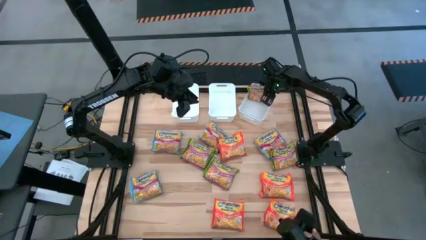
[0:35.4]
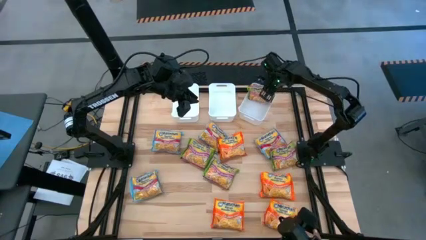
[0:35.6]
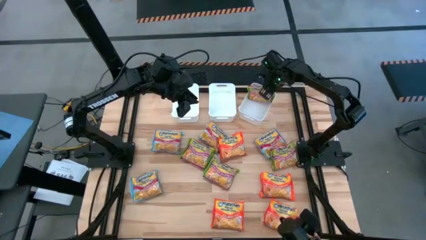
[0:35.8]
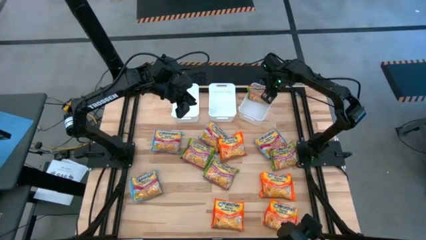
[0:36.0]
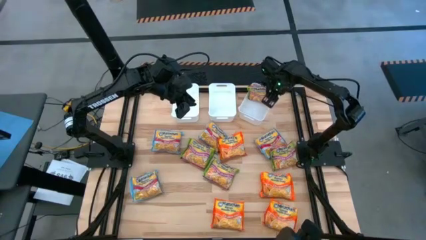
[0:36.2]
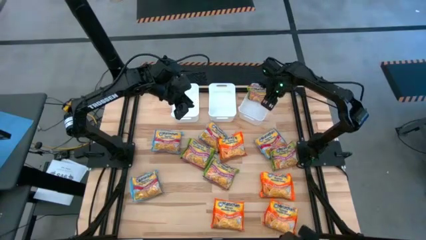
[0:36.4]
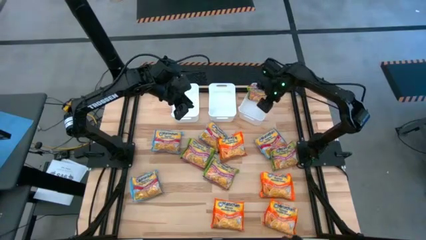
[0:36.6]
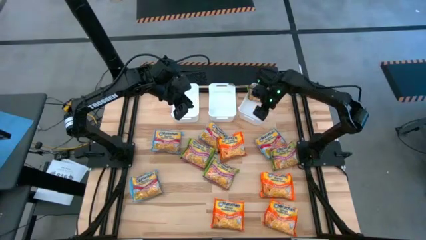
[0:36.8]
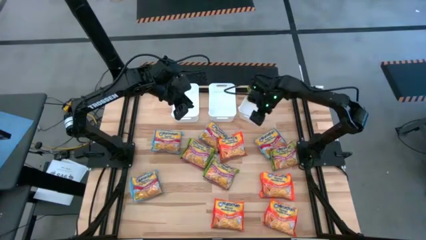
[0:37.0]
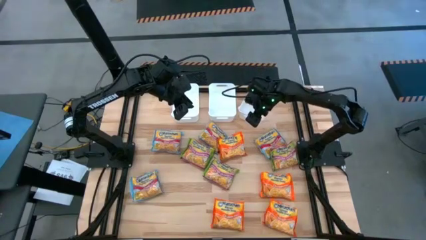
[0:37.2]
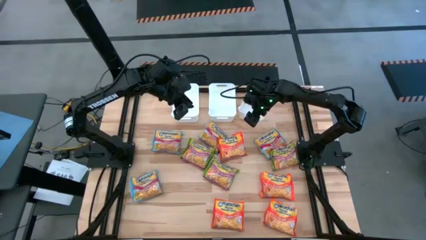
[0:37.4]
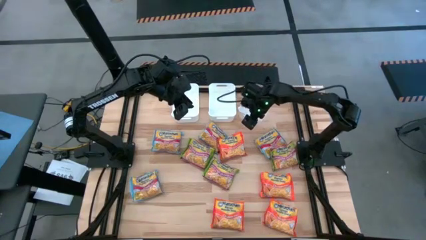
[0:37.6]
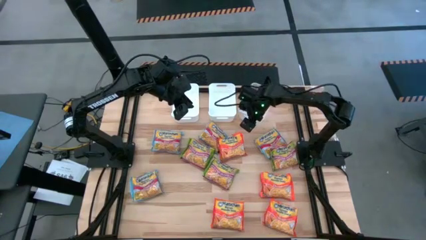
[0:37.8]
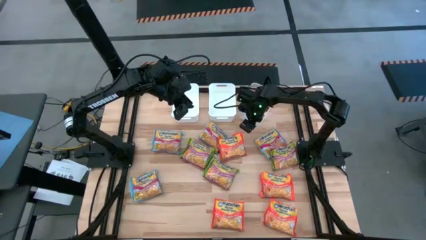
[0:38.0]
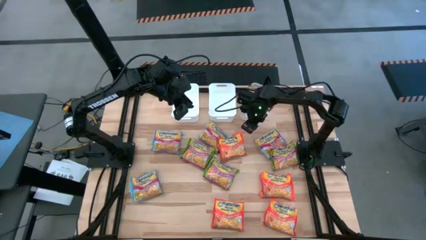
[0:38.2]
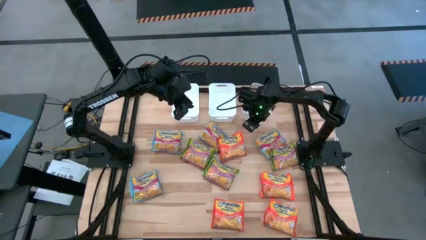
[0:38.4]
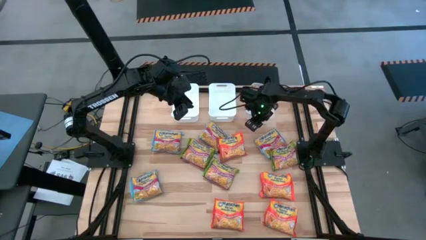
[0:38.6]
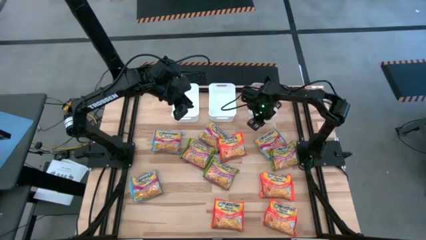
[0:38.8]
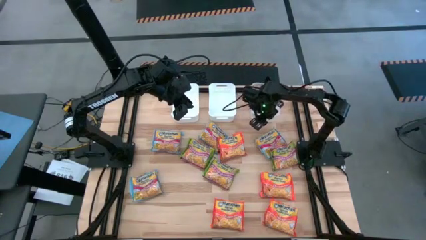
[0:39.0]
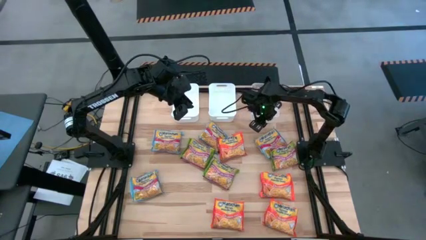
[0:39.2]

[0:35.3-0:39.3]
Task: Sort Maruchan noodles
Adjust the right white bin

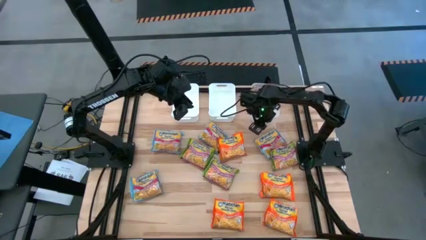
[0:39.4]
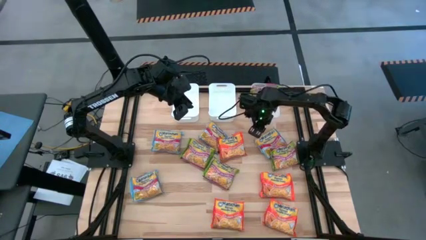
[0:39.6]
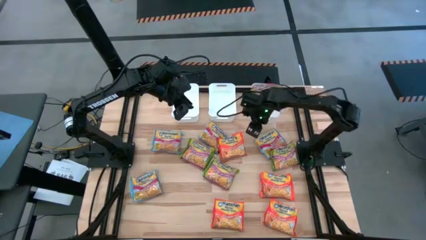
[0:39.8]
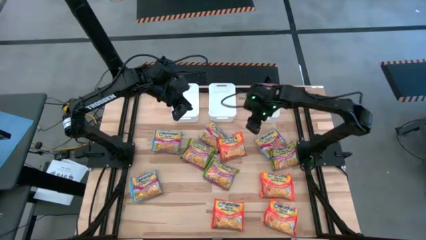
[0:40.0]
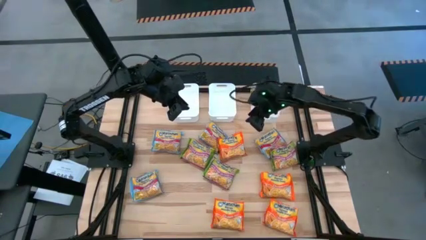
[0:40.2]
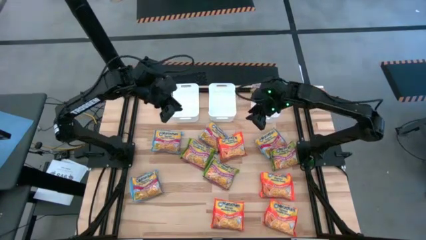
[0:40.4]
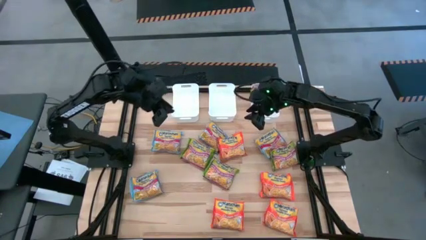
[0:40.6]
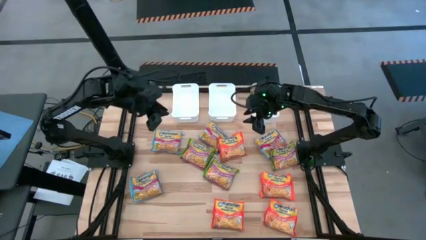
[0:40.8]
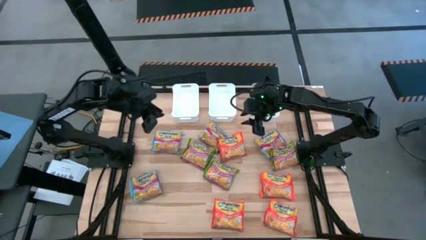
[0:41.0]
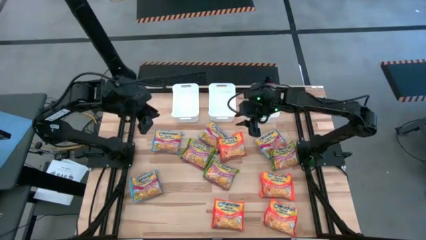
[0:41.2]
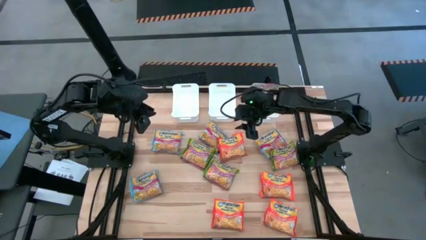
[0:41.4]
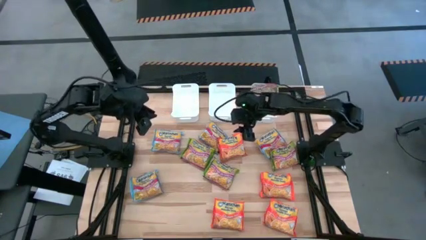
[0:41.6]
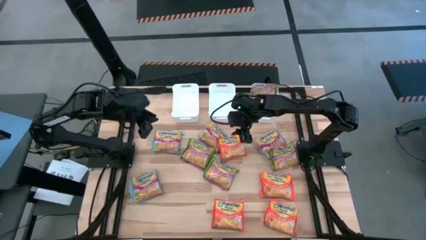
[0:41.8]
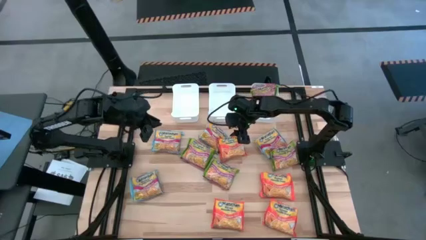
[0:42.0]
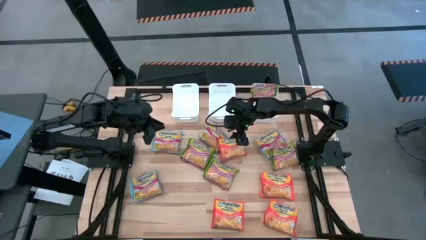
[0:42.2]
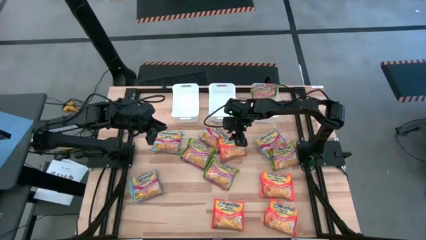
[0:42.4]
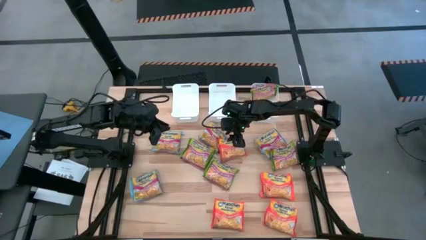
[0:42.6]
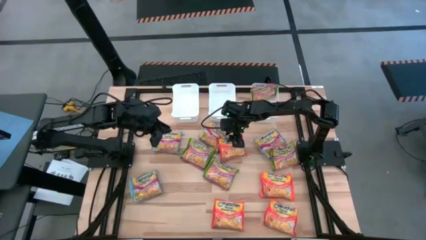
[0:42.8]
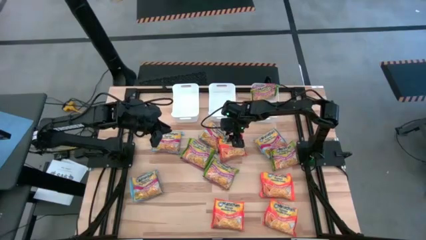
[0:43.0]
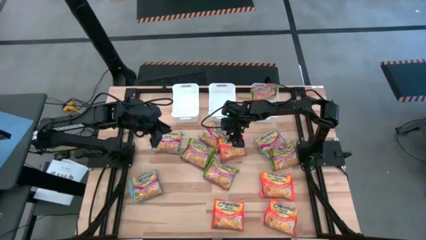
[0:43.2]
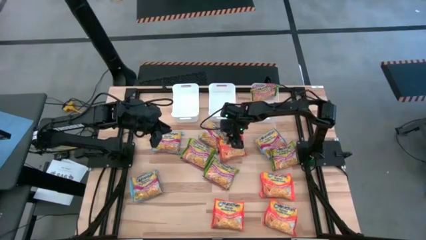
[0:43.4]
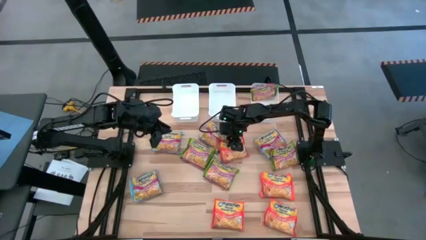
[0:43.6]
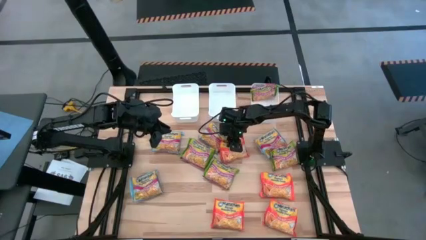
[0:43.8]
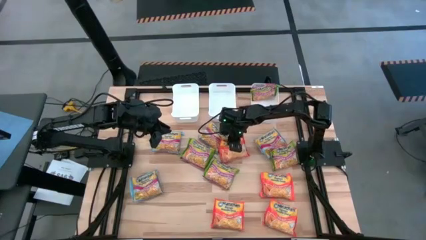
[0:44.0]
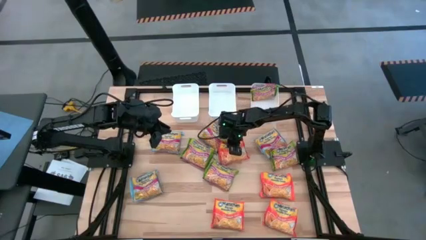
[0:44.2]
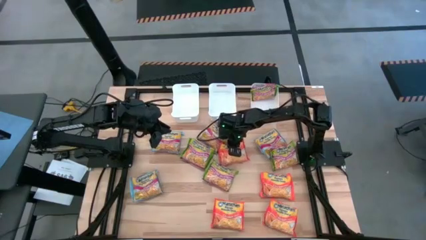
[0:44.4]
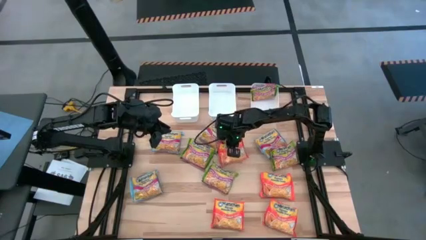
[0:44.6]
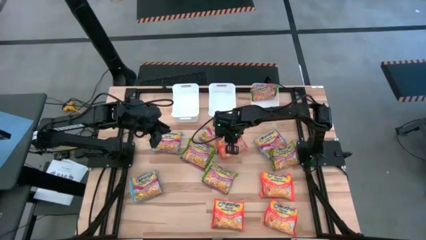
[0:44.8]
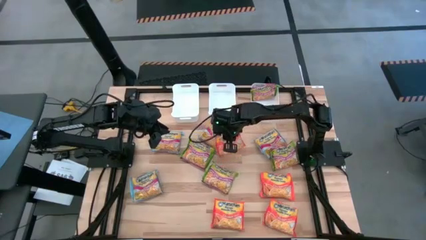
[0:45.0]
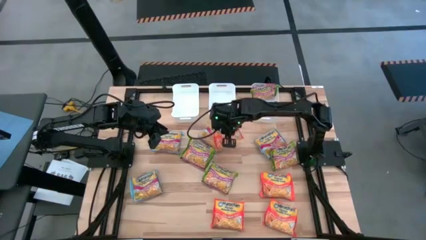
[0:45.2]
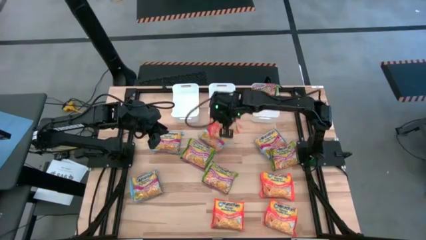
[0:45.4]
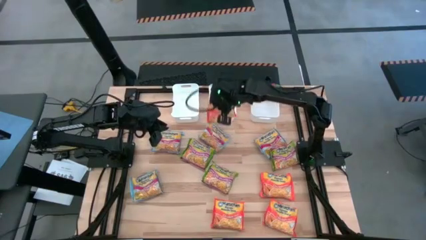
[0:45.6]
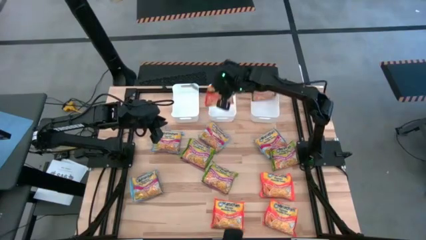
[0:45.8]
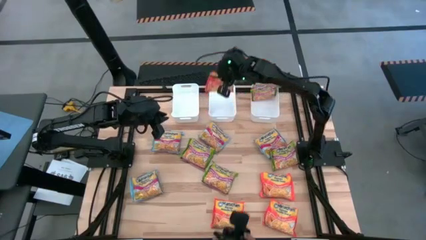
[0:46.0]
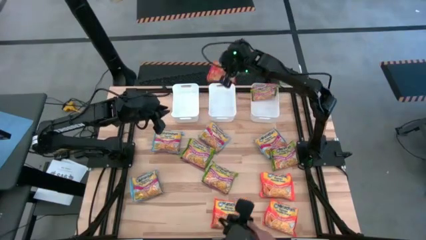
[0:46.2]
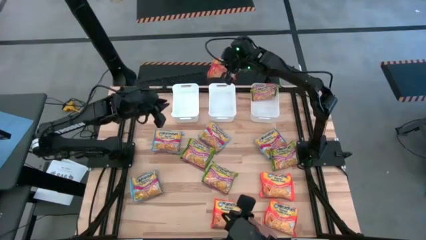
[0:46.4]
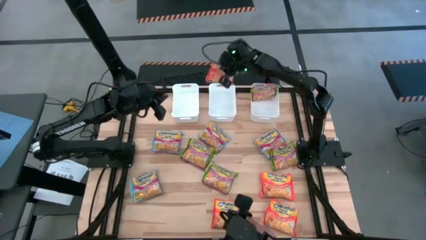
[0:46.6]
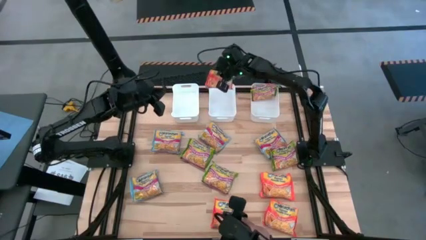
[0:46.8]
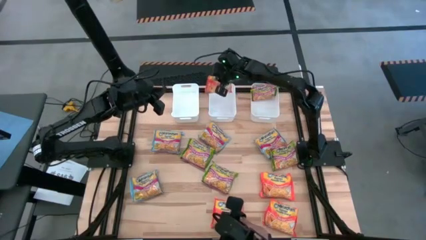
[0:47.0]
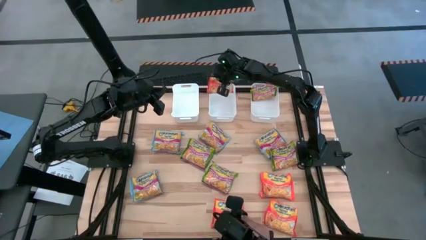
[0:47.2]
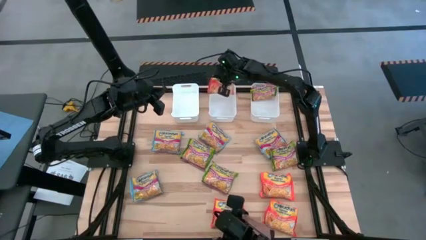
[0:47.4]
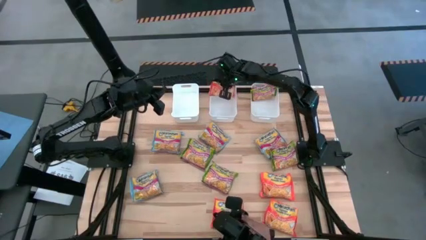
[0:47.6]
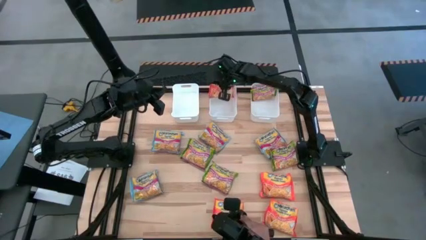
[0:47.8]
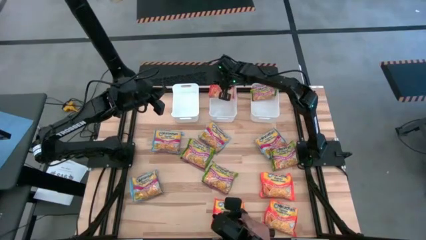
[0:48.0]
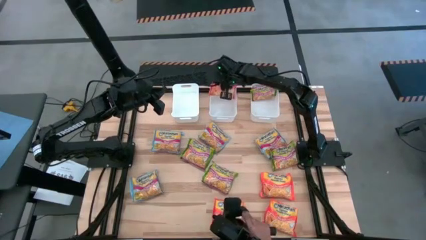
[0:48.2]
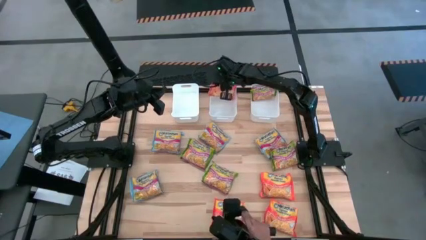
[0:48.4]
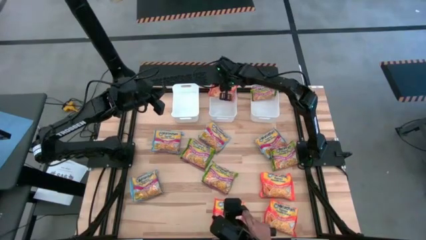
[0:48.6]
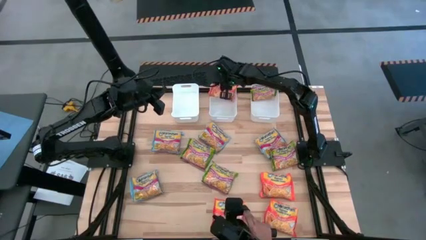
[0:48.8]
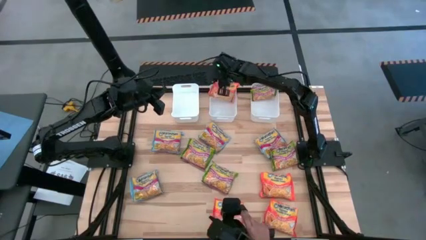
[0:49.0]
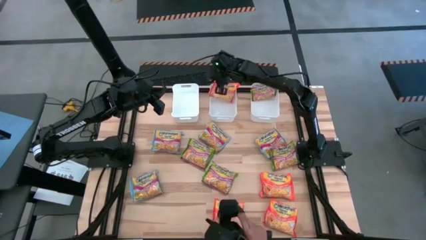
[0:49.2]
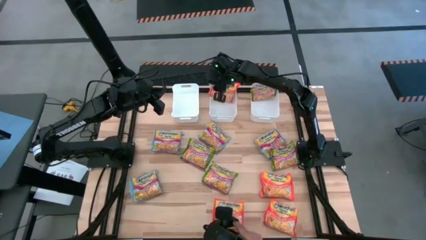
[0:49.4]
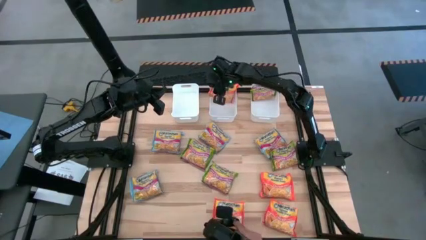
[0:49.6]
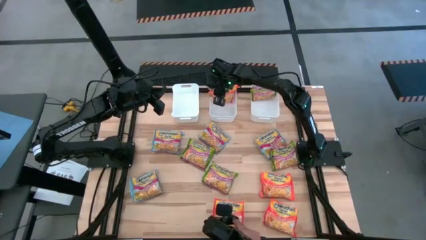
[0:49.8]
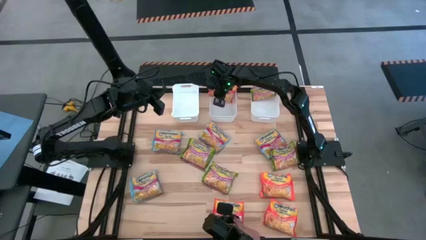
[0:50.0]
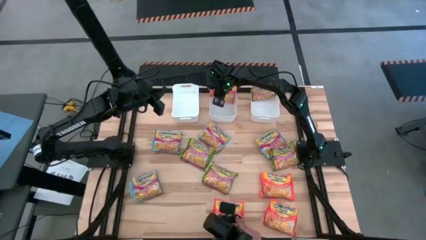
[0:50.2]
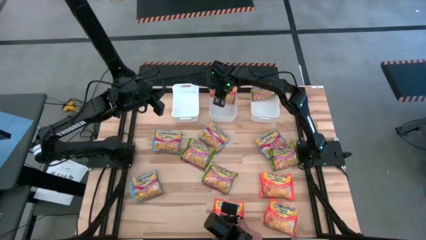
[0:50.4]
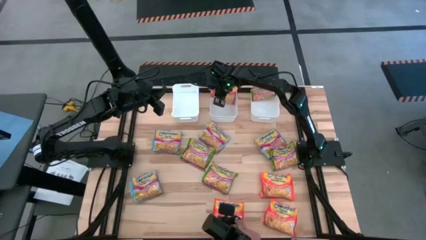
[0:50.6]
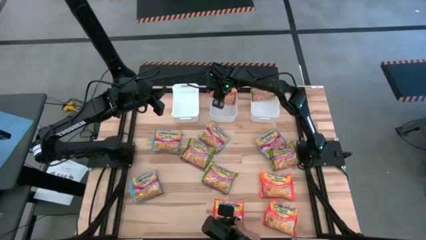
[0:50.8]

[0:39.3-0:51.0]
Put the orange noodle pack into the middle white bin
